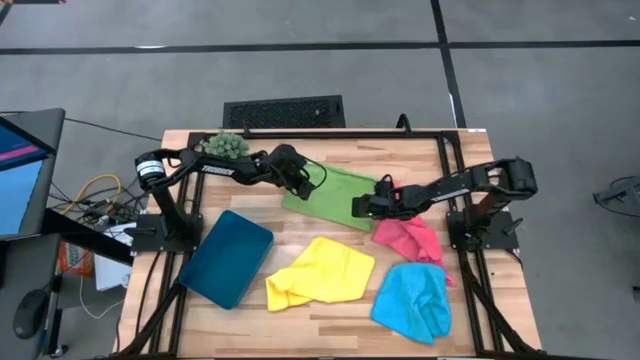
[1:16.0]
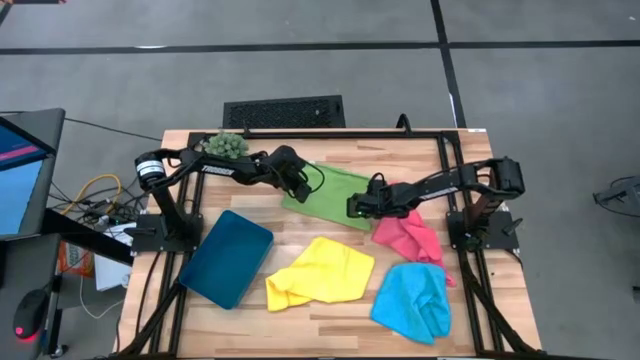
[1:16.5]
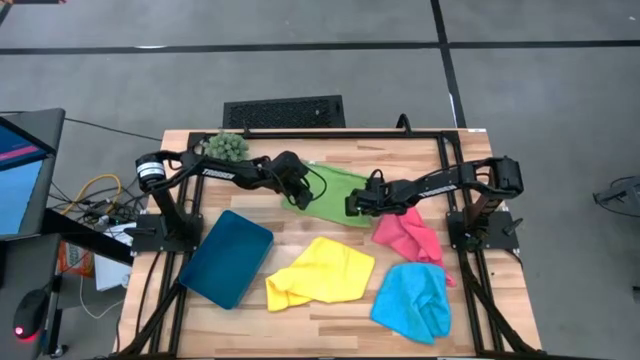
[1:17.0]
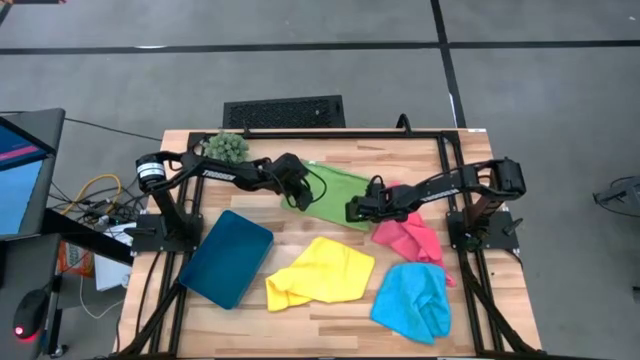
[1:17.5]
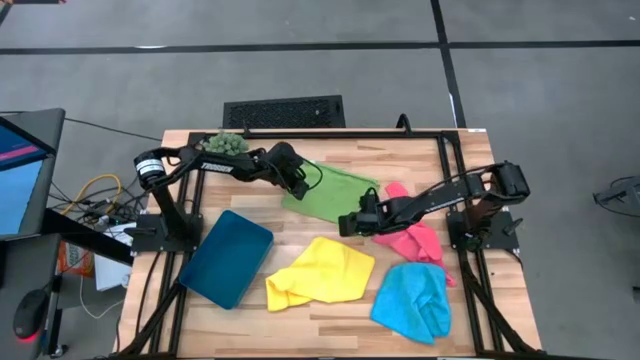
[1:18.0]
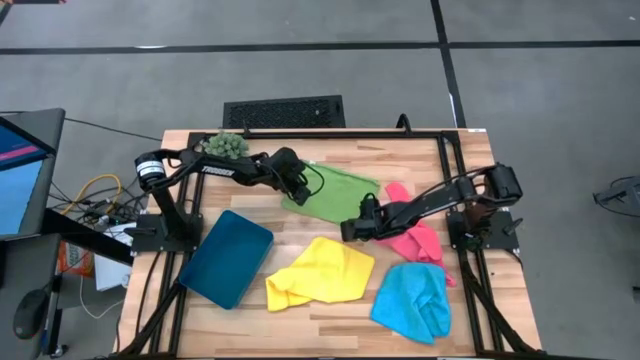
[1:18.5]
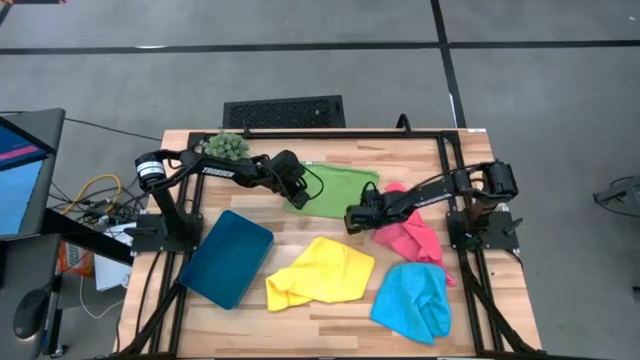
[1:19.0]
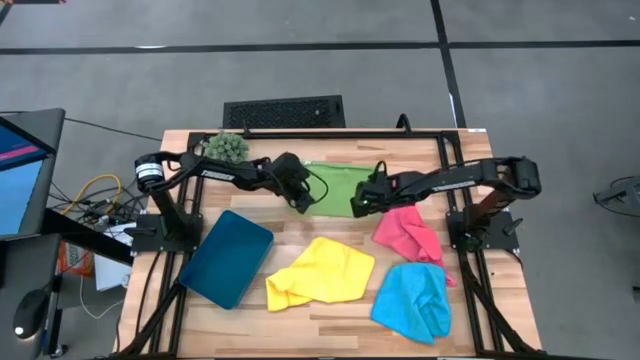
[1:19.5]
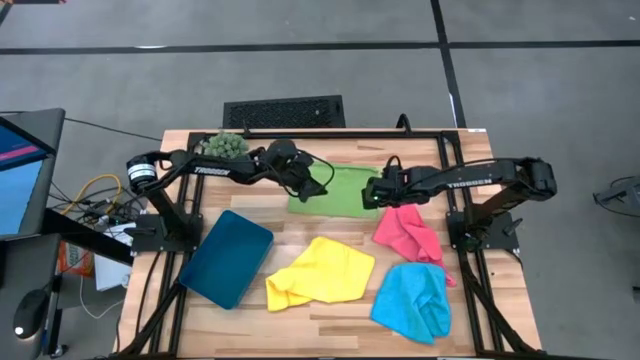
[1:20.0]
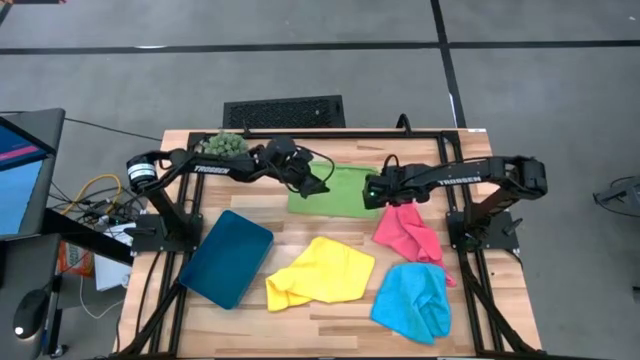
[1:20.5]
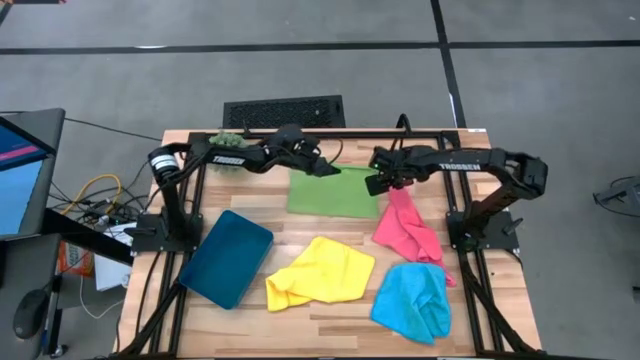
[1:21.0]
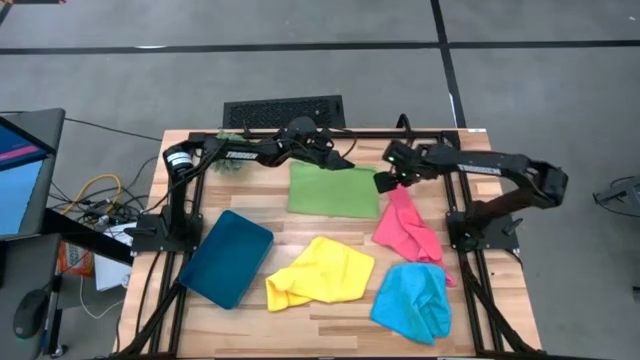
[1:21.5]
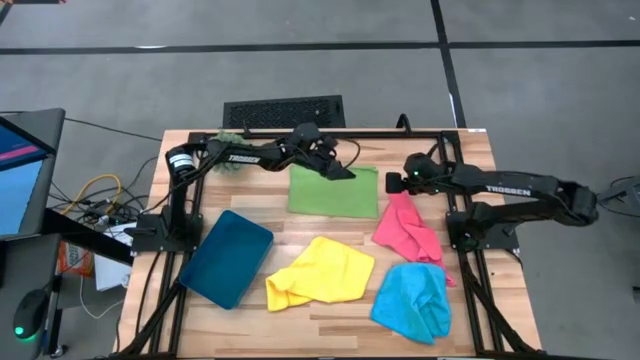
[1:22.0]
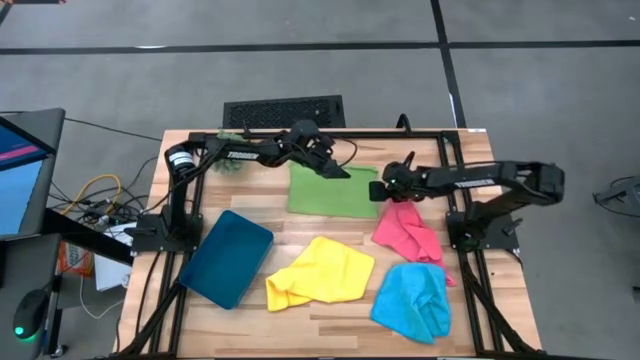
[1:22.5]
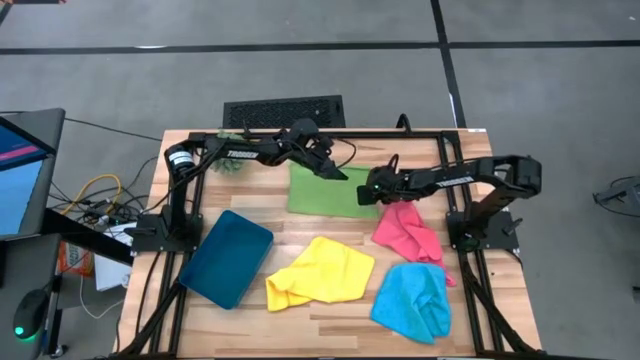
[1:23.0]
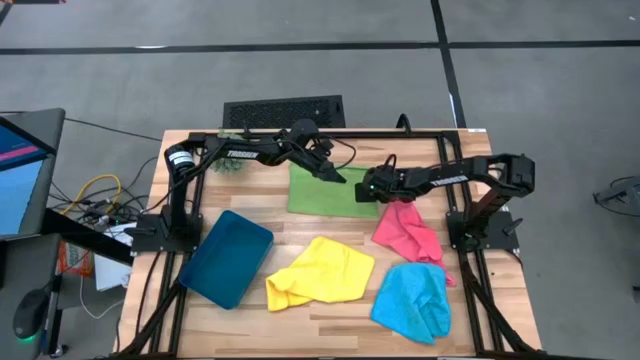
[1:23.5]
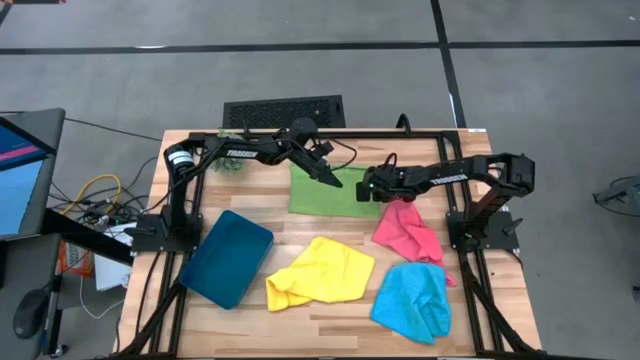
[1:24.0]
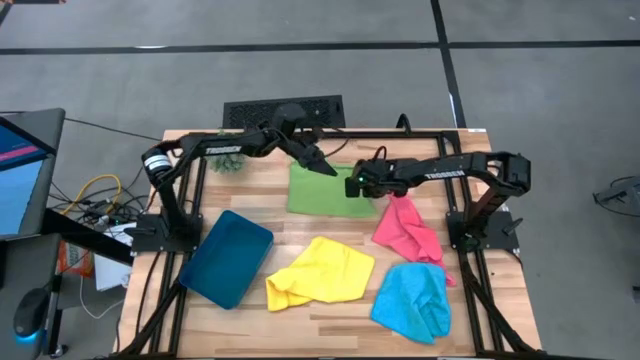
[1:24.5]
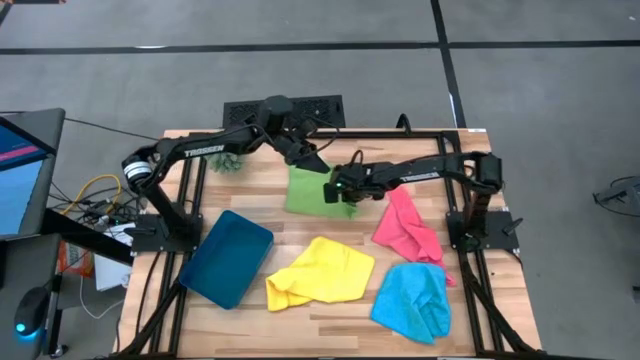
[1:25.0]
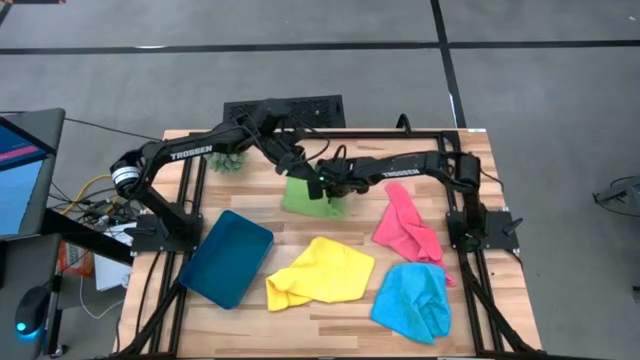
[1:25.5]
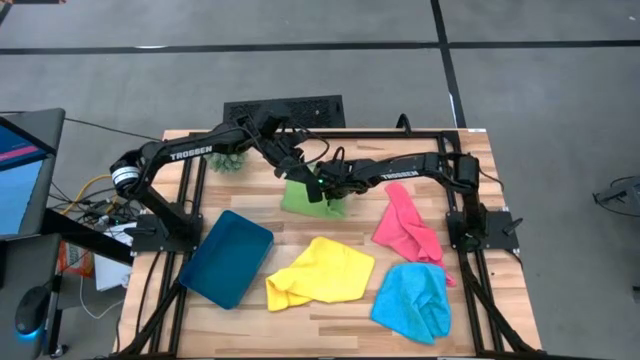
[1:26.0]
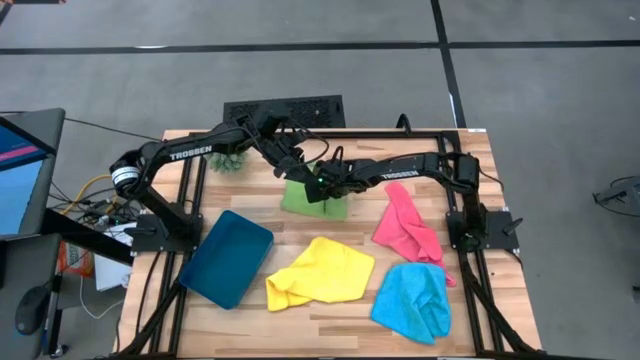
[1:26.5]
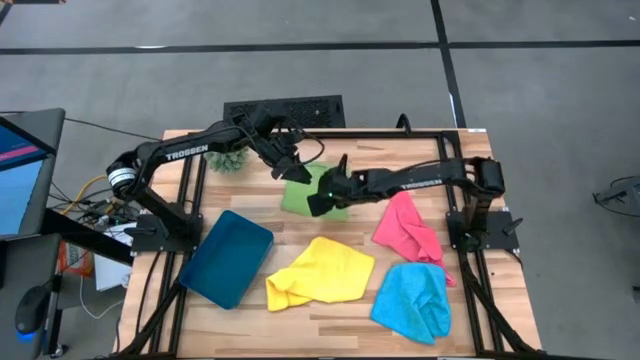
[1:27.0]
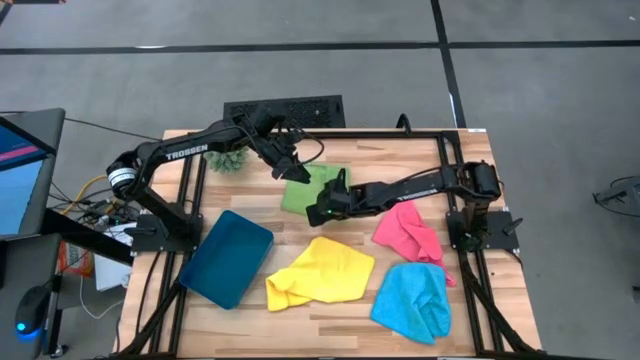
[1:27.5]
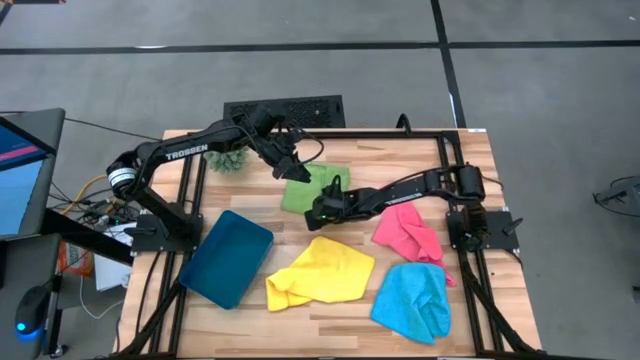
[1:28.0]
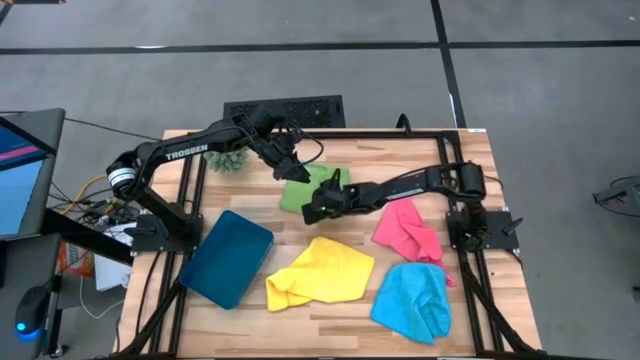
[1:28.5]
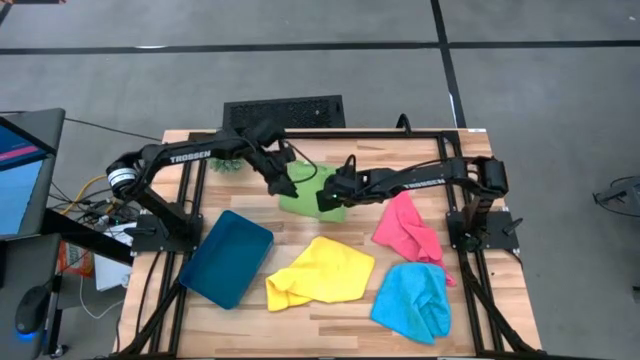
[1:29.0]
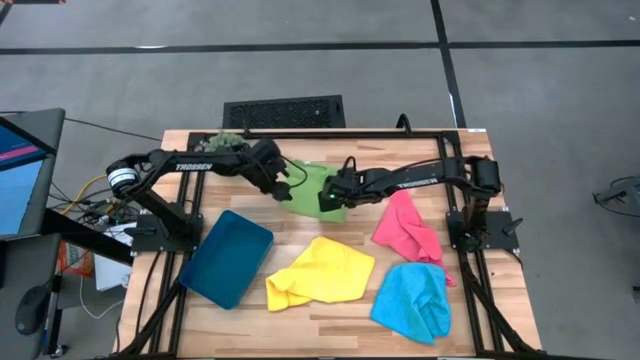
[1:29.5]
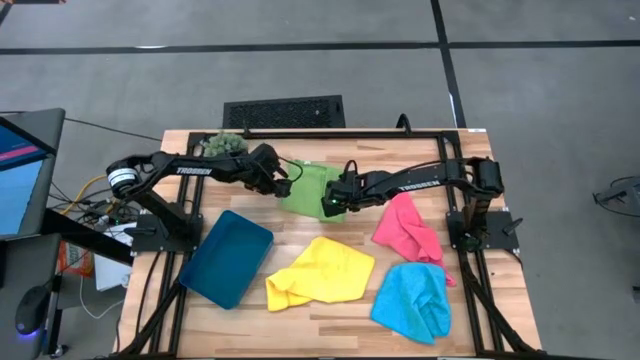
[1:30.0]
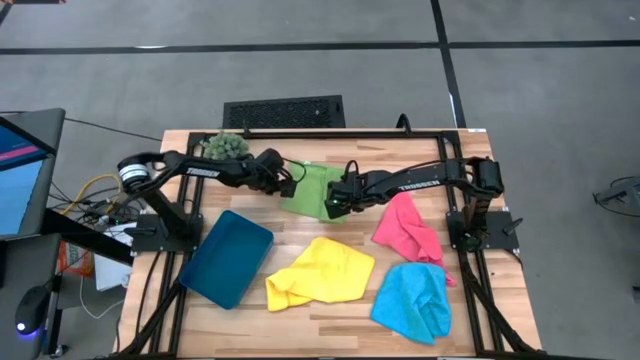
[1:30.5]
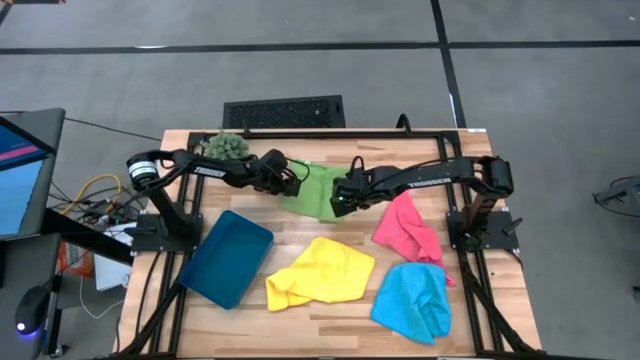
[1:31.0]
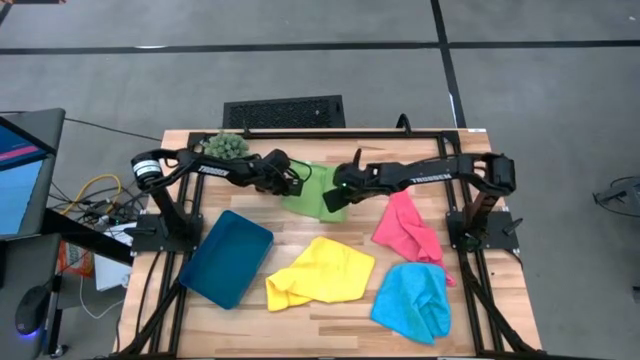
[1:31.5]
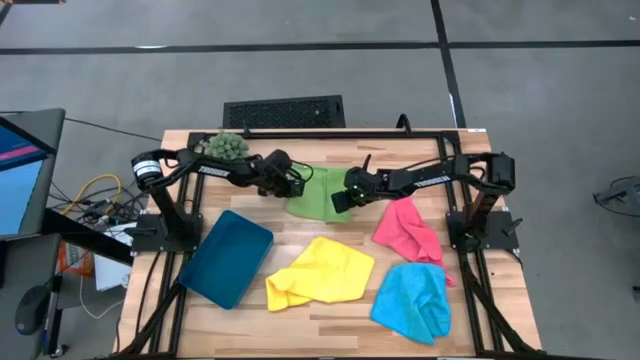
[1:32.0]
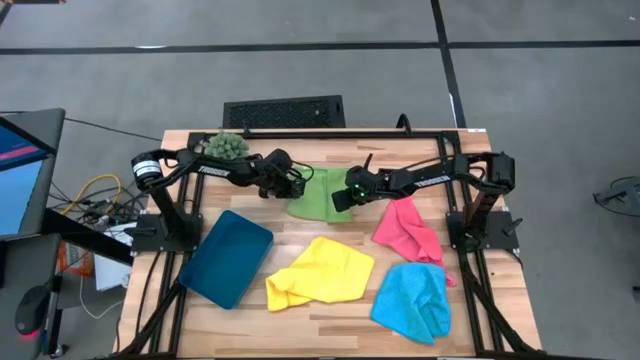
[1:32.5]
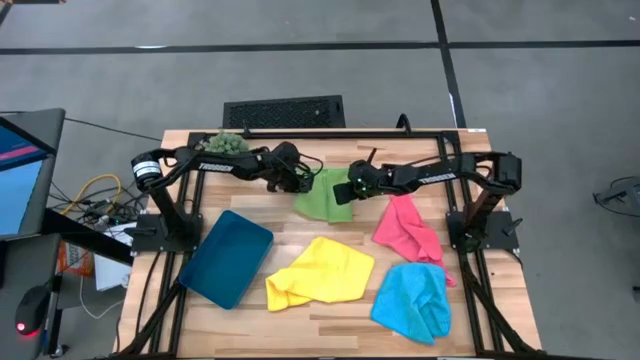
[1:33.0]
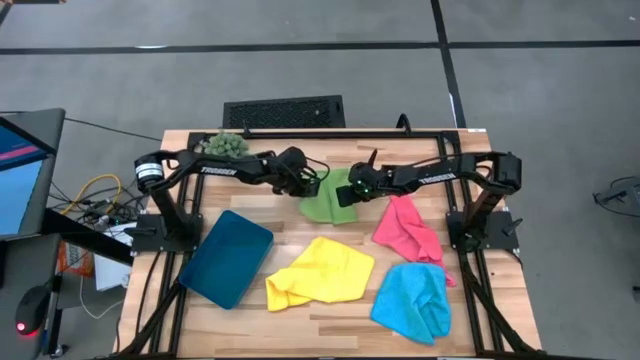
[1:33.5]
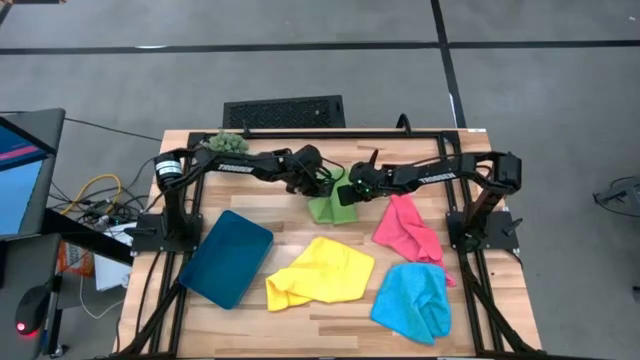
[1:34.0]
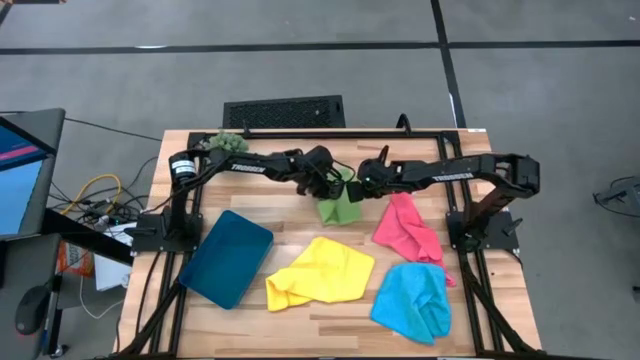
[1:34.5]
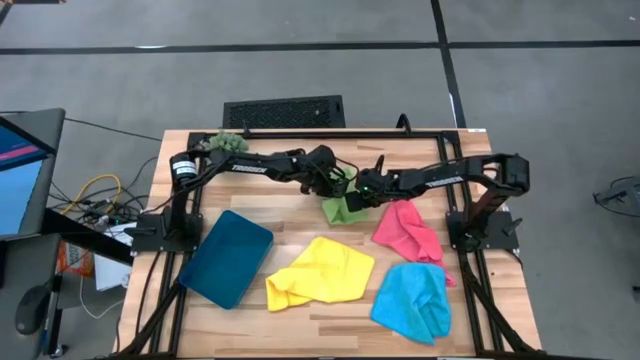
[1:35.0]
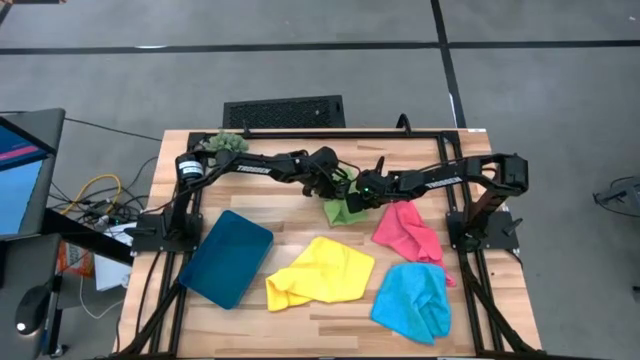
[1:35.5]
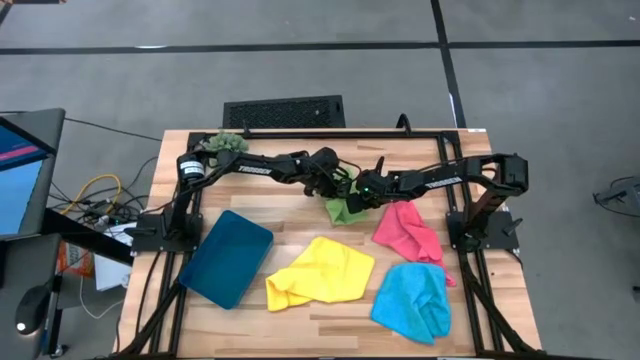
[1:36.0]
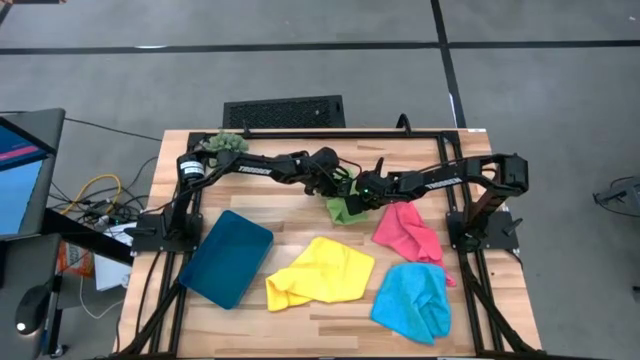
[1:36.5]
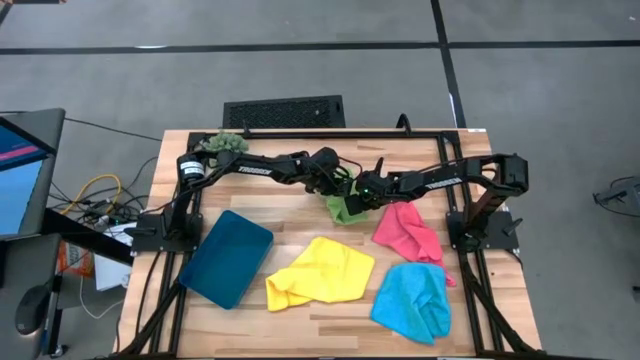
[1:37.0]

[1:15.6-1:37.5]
Task: Fold microfiber towels
Fold the green microfiber towel
